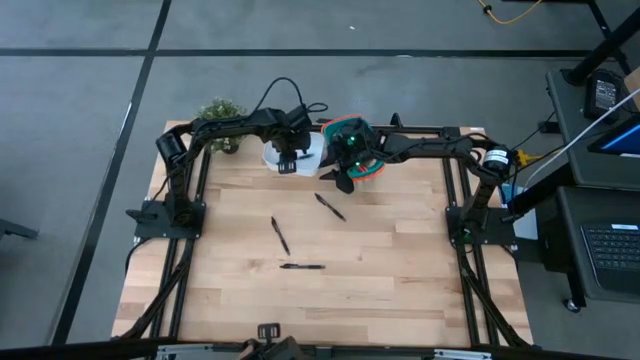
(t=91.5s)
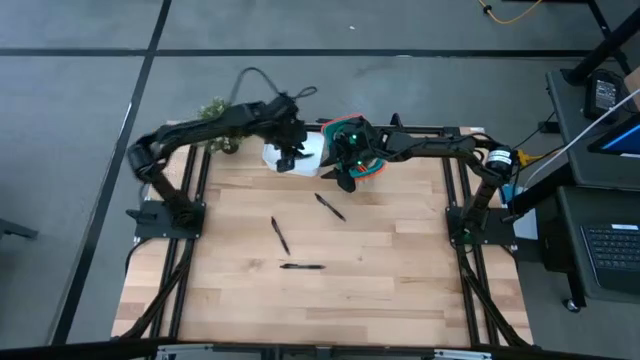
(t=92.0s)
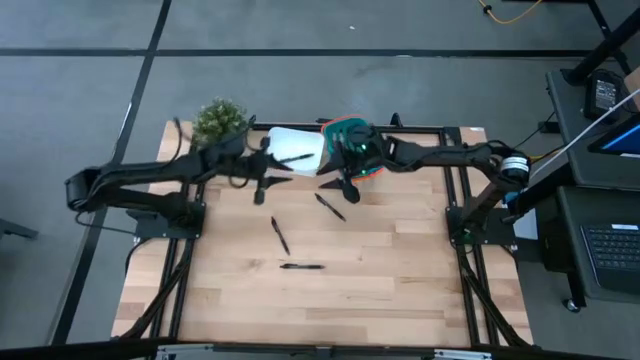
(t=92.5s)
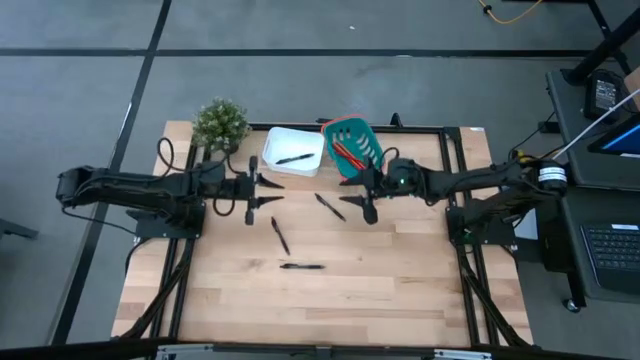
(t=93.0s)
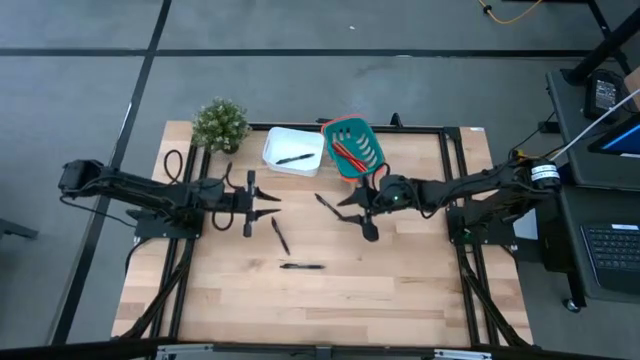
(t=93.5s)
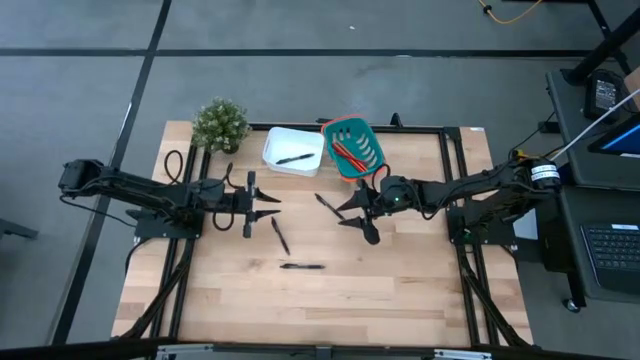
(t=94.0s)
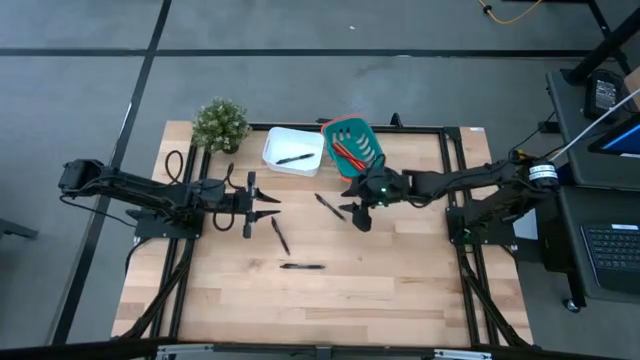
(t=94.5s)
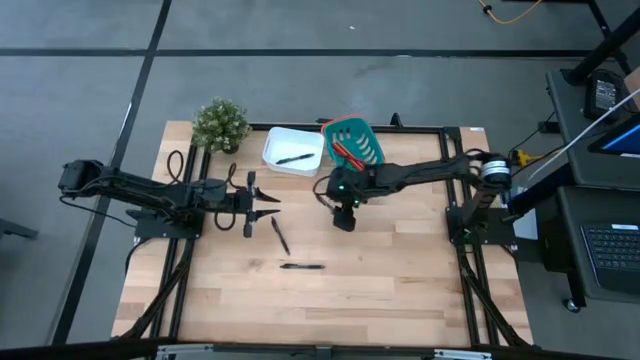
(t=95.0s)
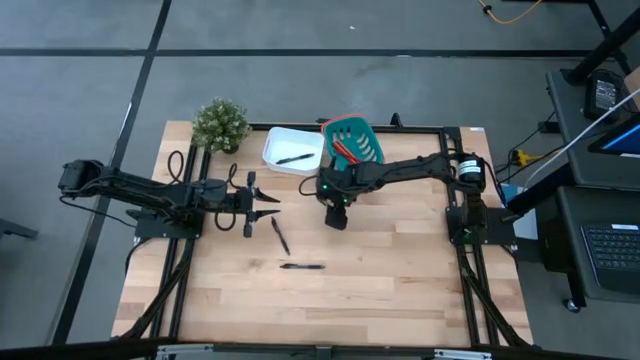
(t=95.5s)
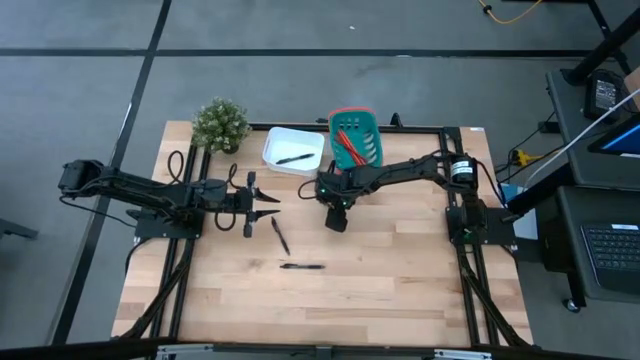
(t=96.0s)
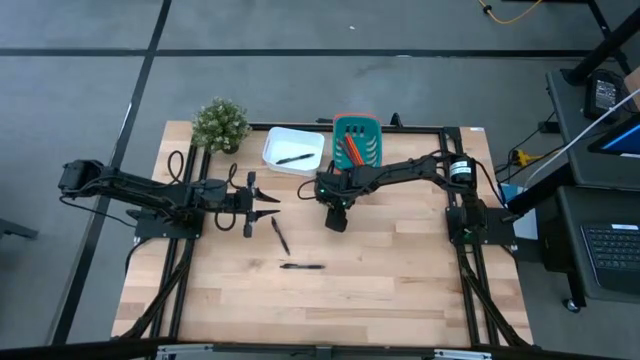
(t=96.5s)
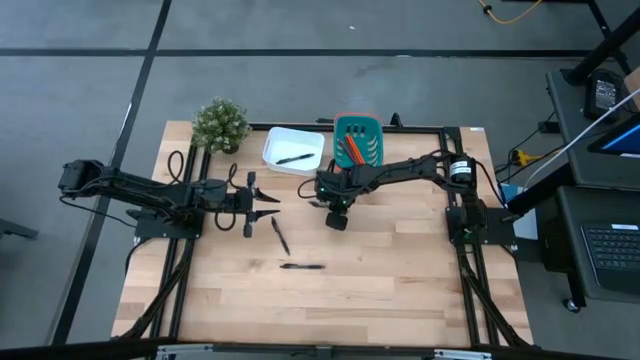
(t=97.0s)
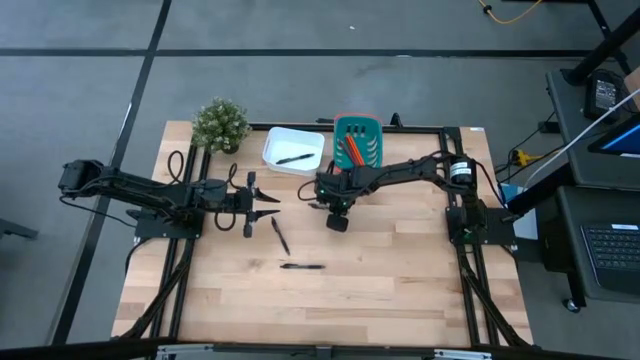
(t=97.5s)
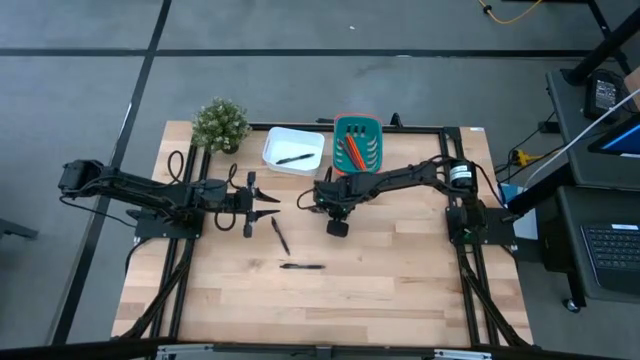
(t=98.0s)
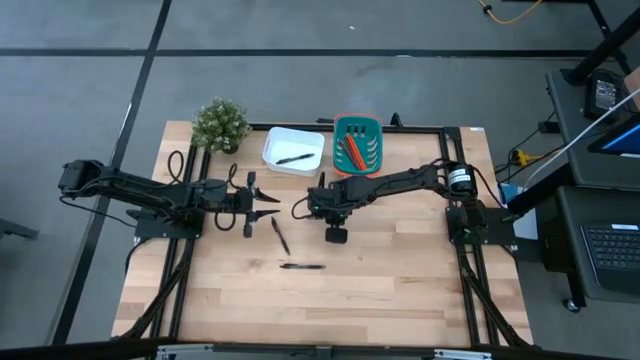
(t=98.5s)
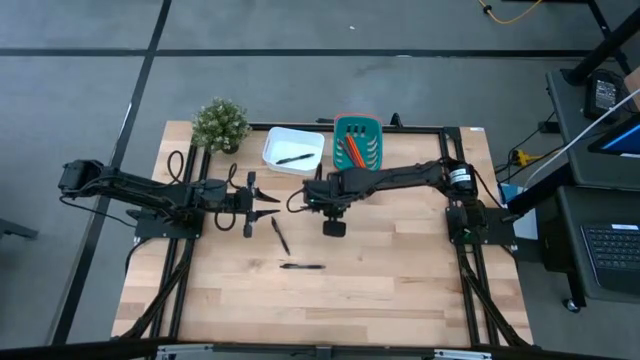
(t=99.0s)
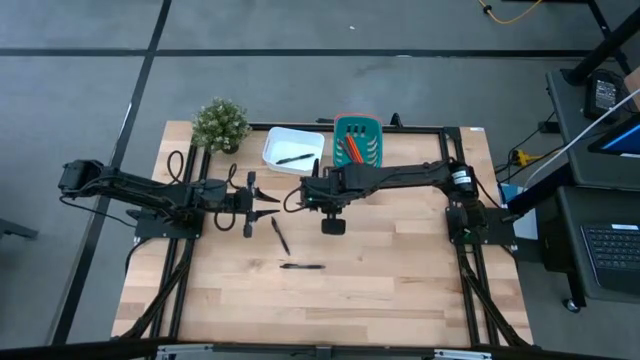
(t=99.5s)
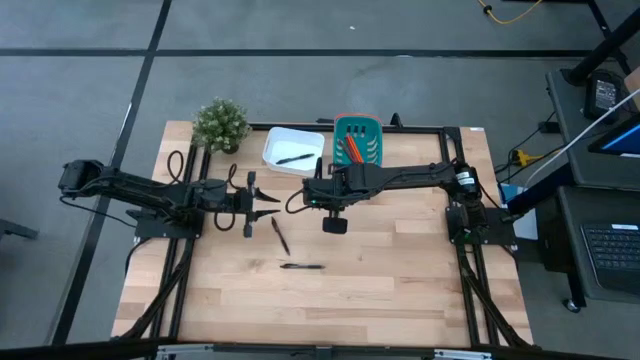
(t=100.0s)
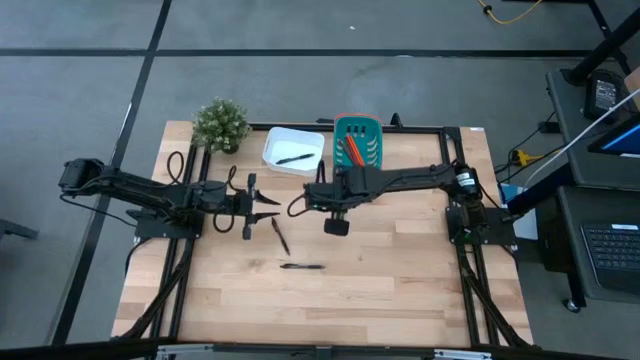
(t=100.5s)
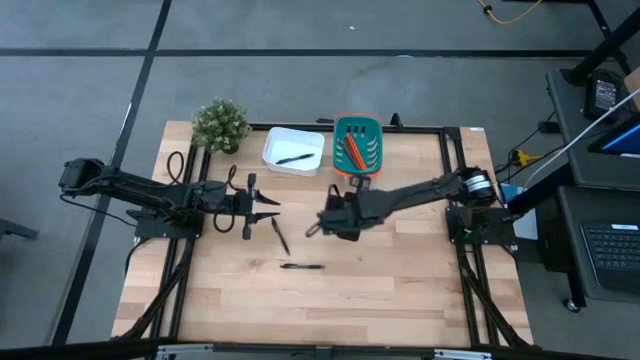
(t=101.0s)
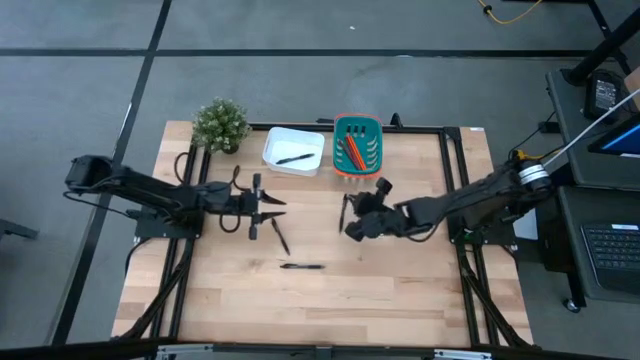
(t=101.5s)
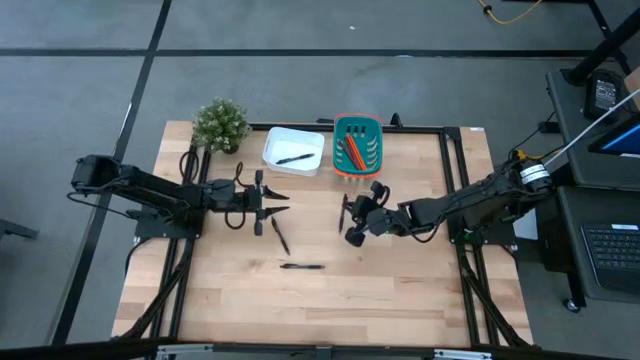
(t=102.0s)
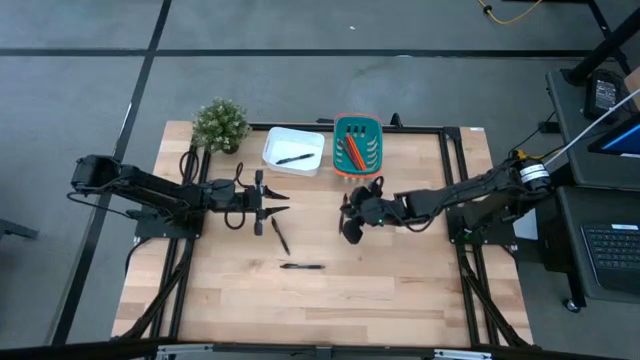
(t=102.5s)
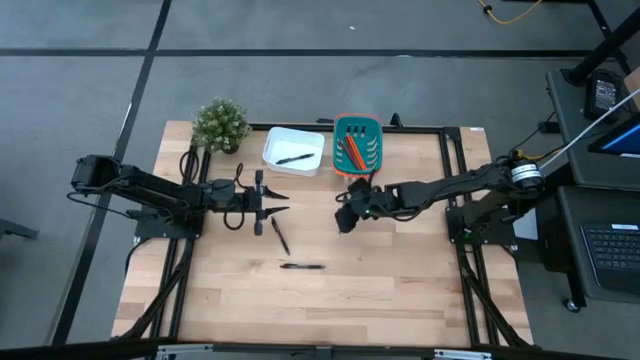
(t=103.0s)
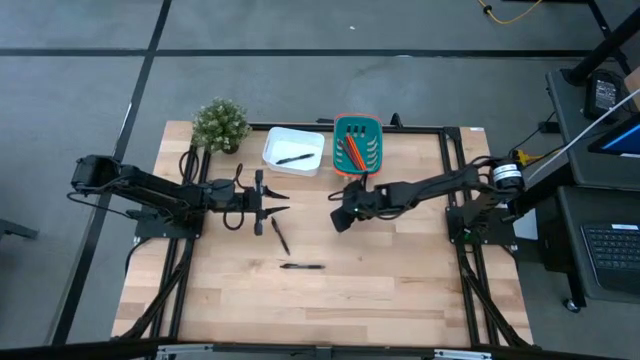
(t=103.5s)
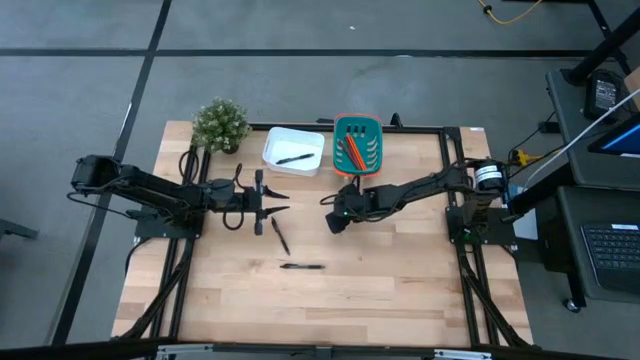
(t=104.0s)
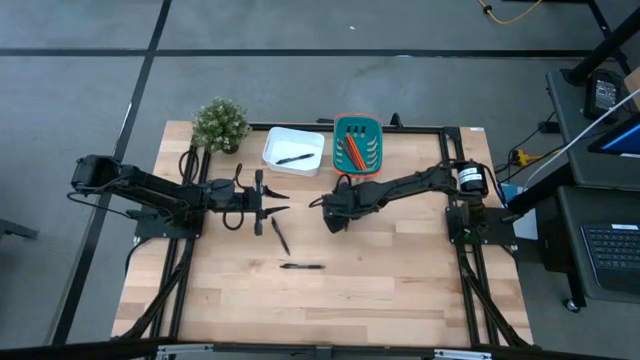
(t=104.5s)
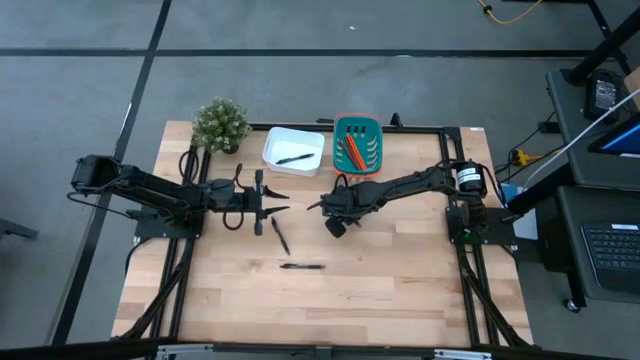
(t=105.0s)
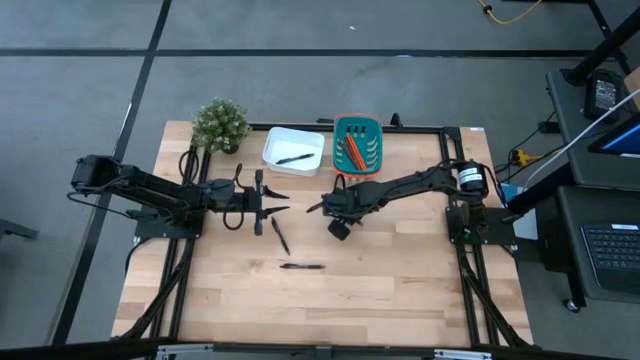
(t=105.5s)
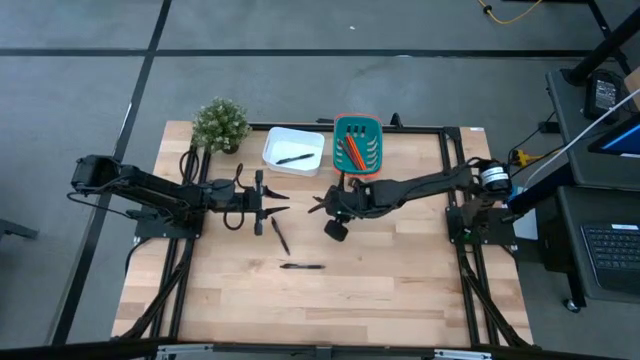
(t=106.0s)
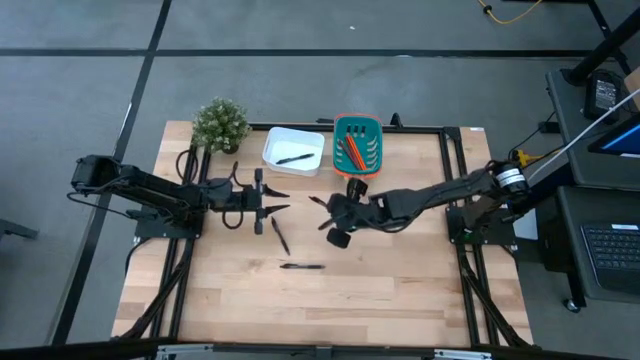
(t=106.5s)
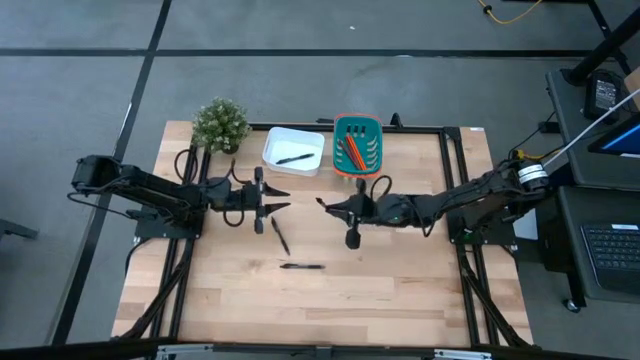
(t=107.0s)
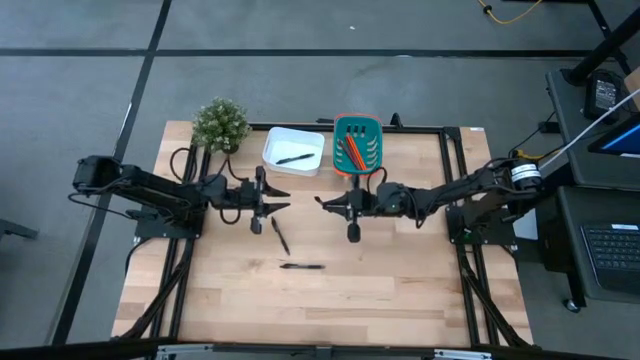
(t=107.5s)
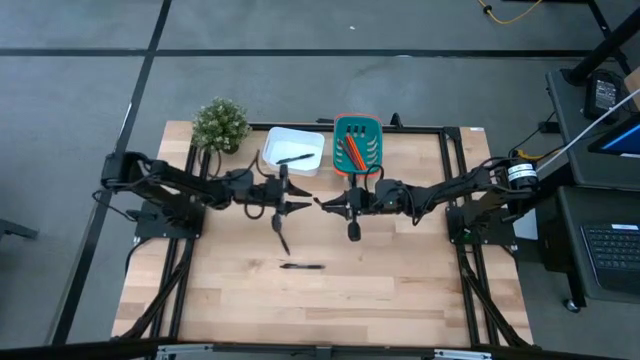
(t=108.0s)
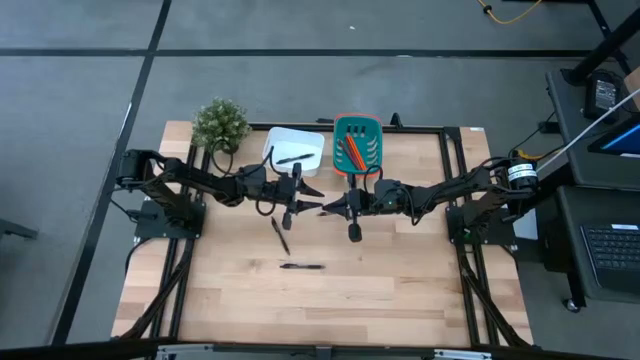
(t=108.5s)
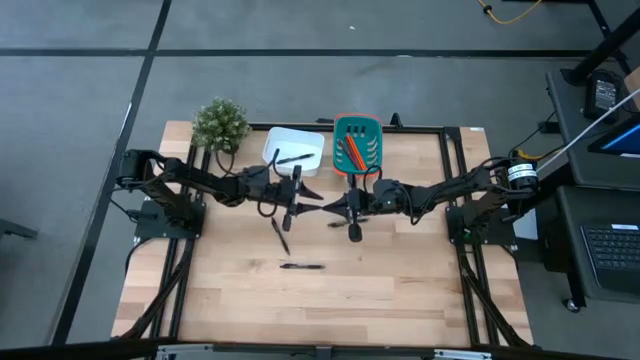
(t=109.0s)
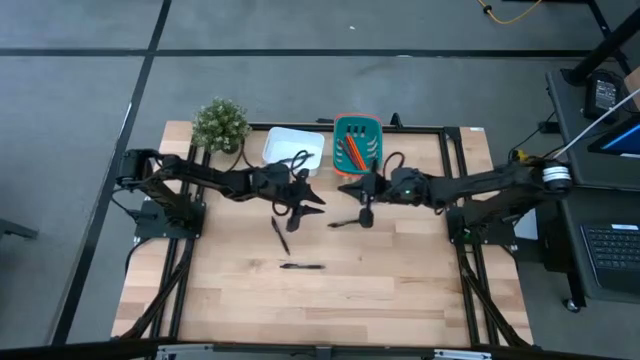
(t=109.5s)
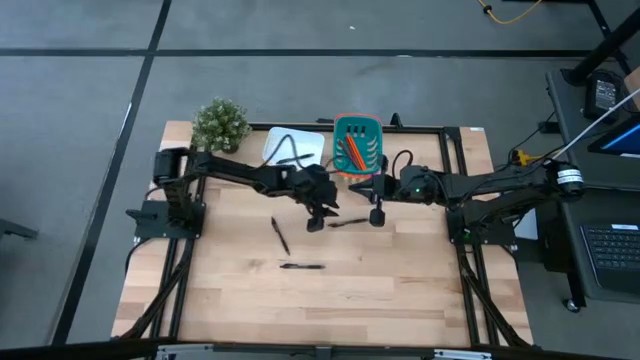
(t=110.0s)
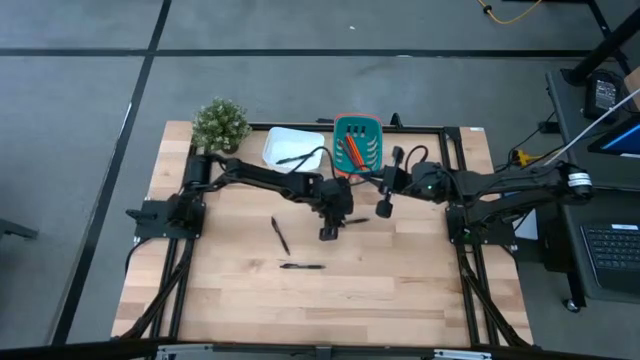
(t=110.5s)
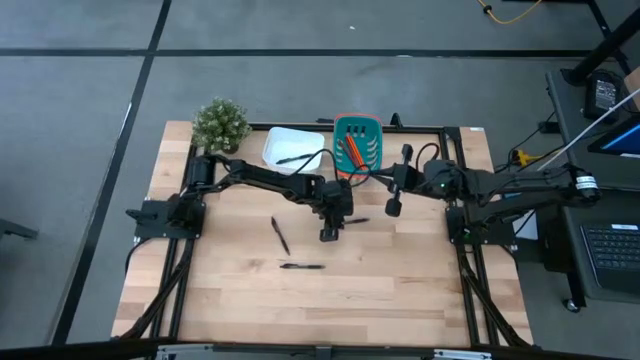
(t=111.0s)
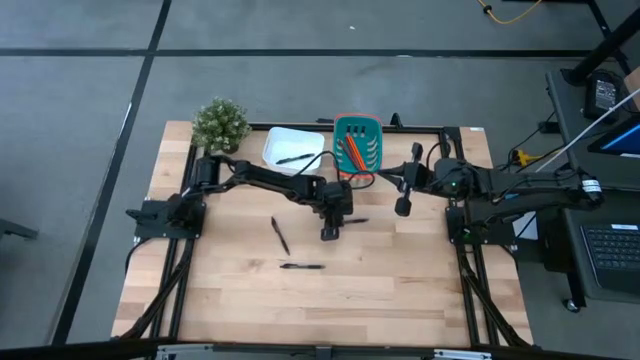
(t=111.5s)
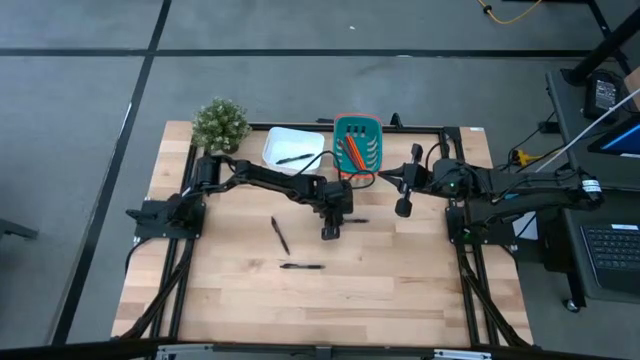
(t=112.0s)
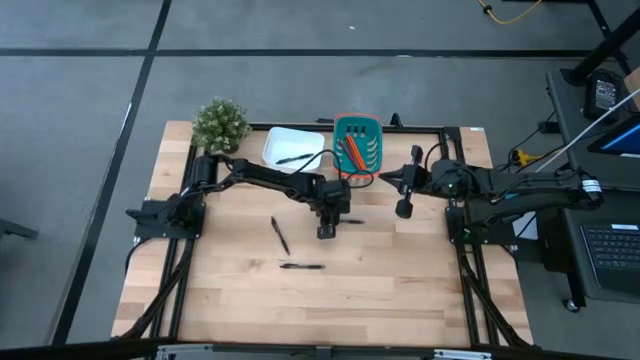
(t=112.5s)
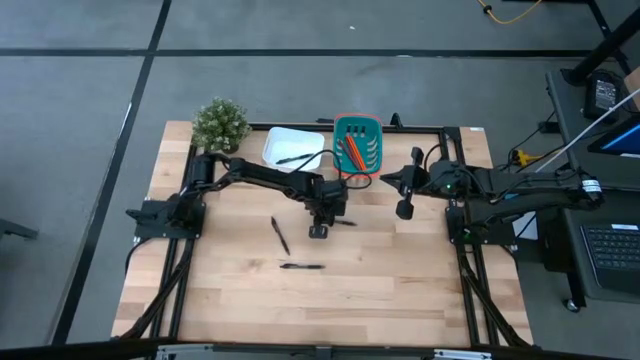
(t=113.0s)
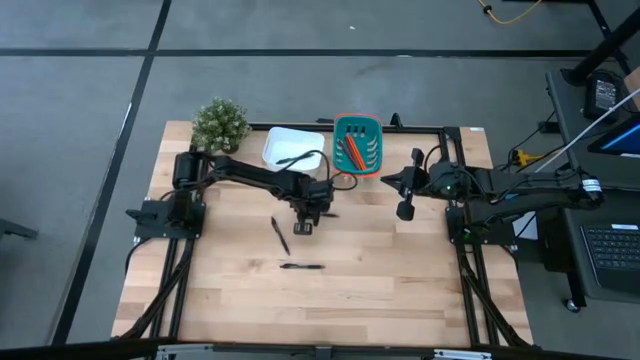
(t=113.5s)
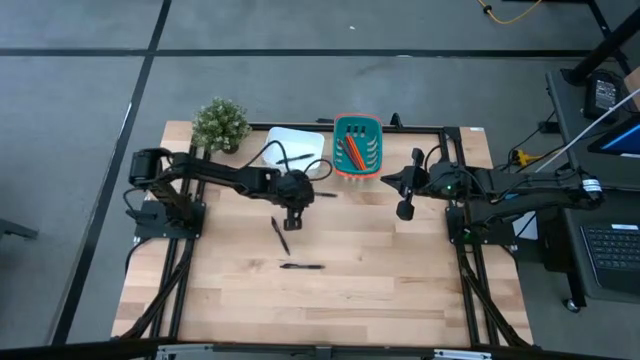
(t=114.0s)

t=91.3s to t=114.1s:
Task: Sort pens & pencils
Put the top right black pen into the white bin
